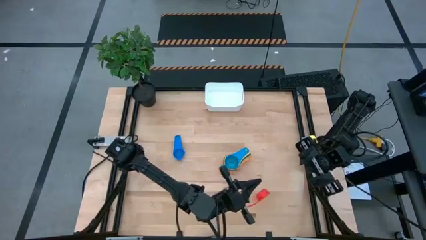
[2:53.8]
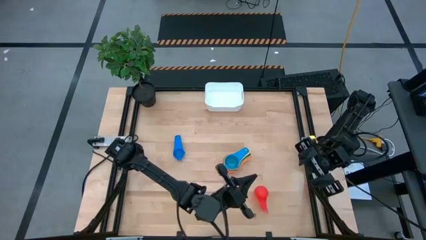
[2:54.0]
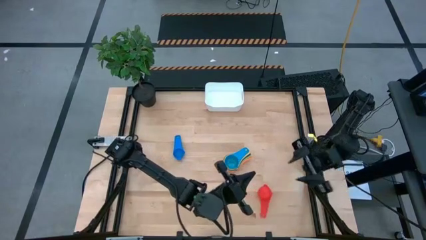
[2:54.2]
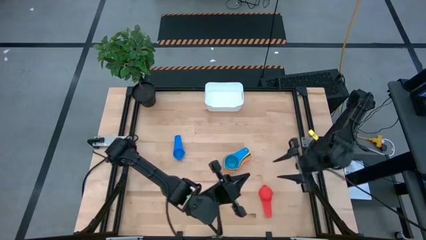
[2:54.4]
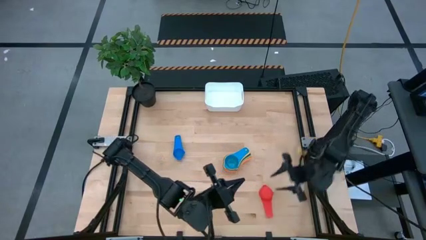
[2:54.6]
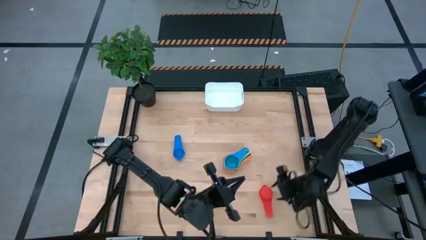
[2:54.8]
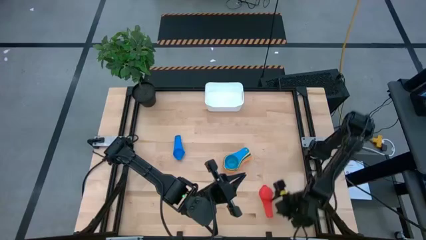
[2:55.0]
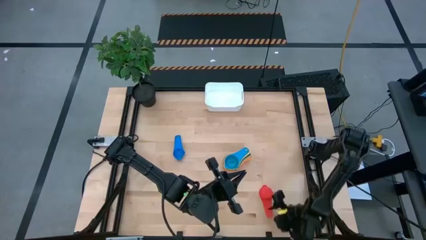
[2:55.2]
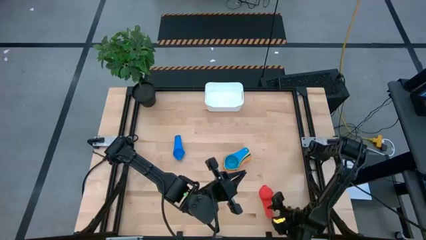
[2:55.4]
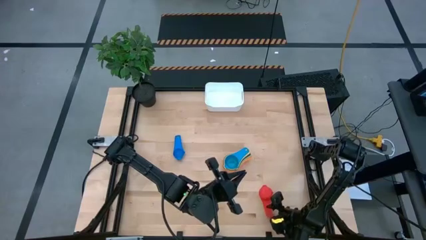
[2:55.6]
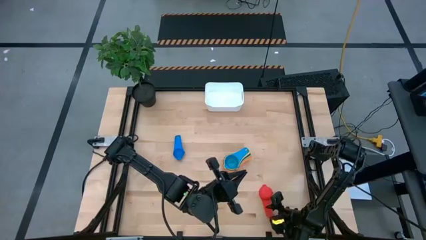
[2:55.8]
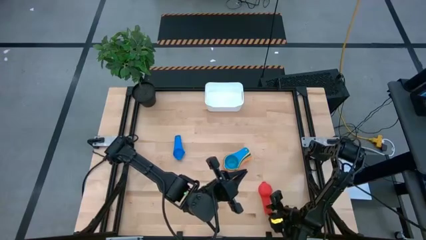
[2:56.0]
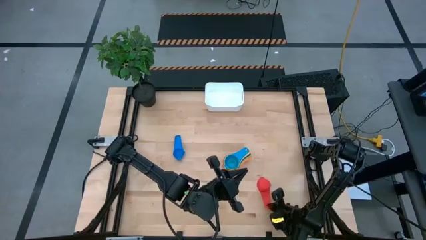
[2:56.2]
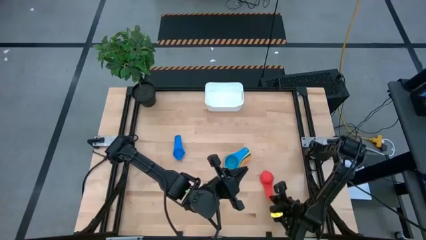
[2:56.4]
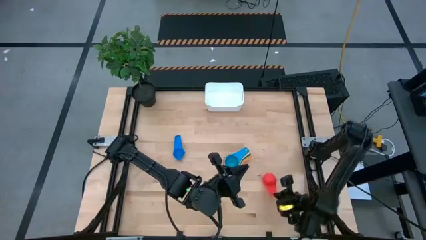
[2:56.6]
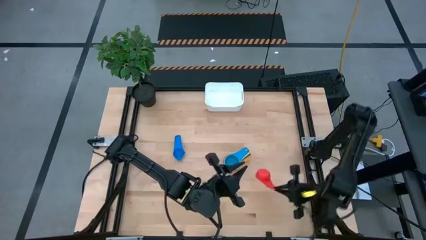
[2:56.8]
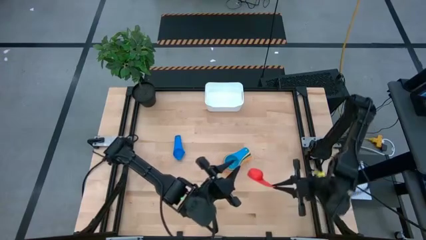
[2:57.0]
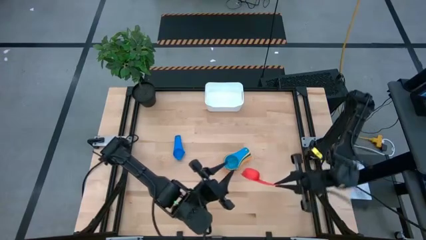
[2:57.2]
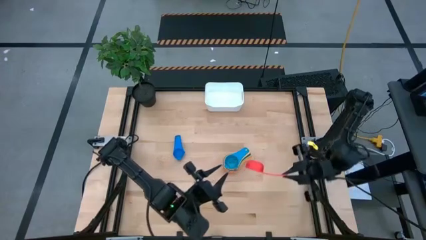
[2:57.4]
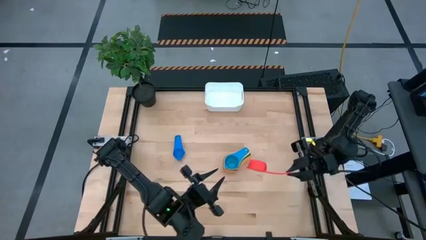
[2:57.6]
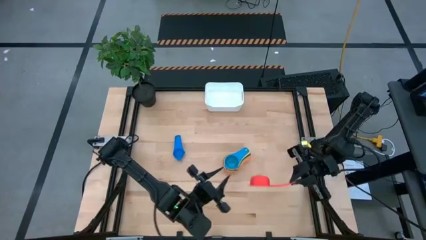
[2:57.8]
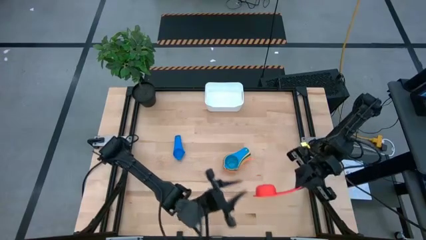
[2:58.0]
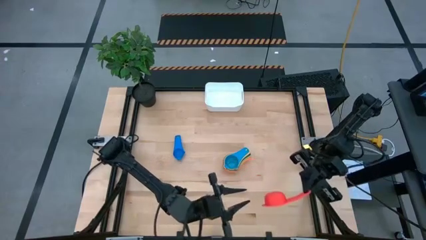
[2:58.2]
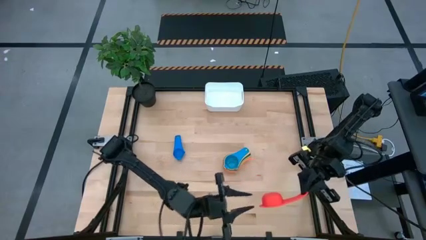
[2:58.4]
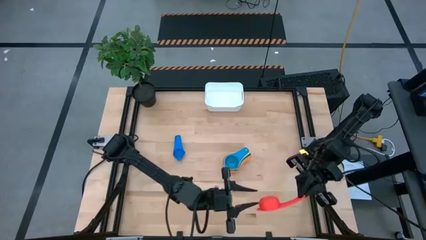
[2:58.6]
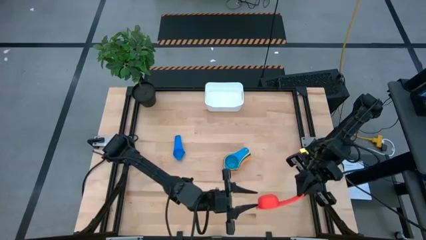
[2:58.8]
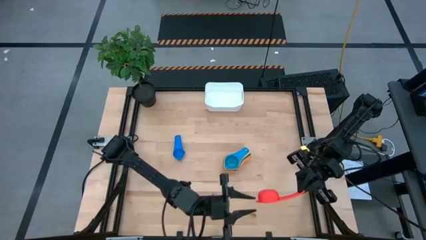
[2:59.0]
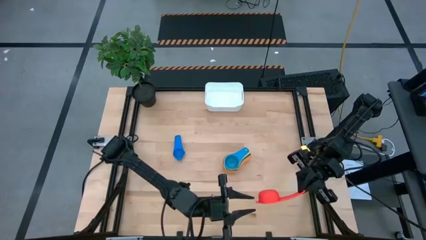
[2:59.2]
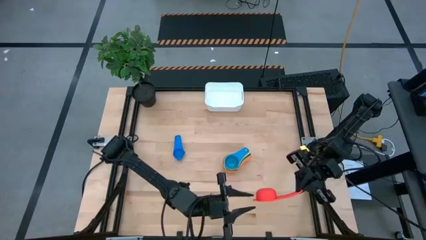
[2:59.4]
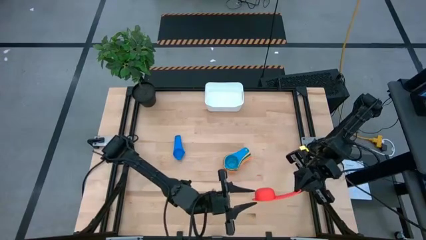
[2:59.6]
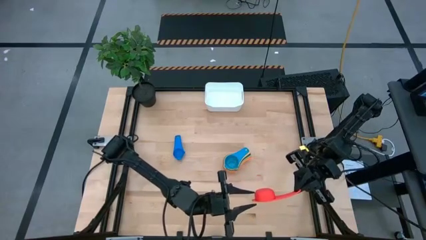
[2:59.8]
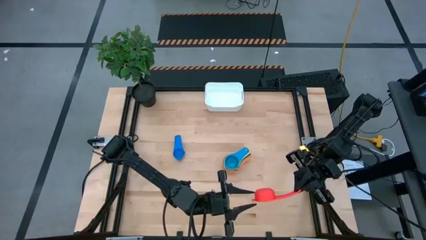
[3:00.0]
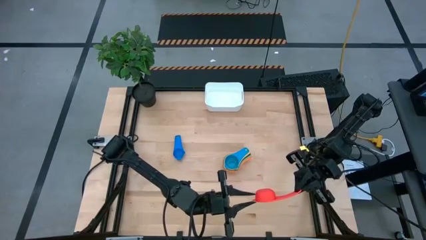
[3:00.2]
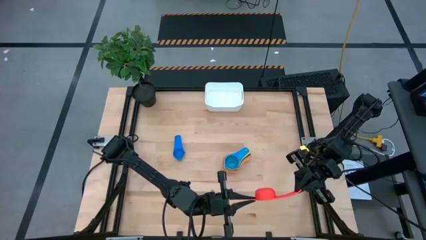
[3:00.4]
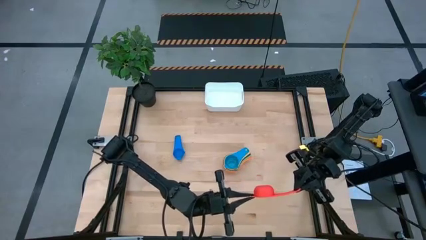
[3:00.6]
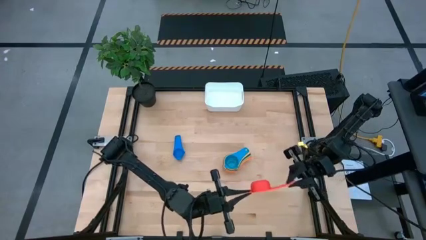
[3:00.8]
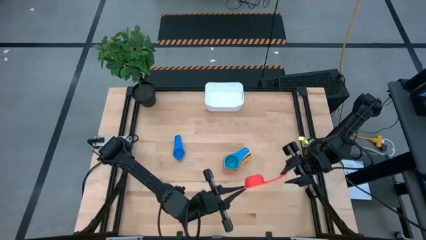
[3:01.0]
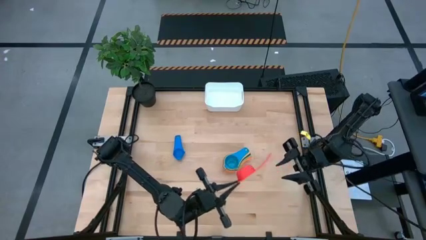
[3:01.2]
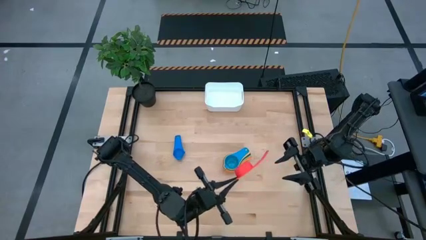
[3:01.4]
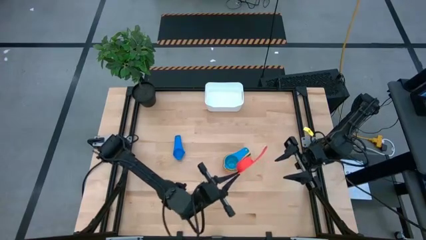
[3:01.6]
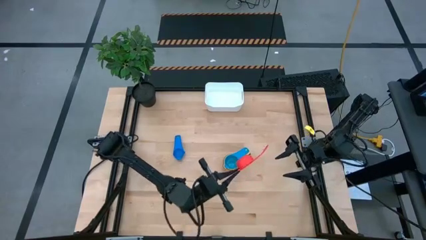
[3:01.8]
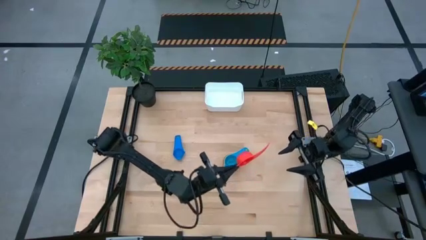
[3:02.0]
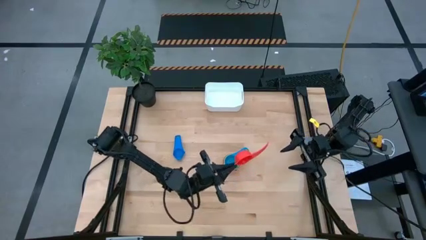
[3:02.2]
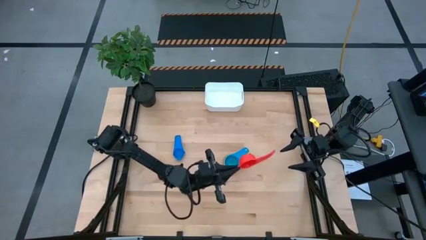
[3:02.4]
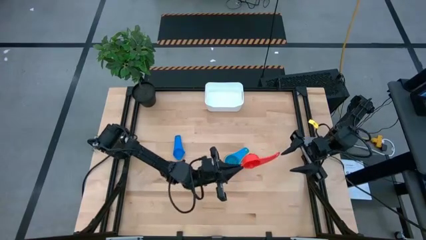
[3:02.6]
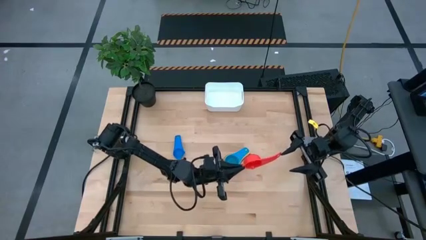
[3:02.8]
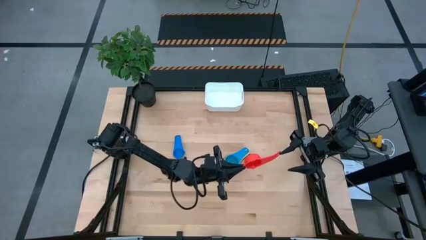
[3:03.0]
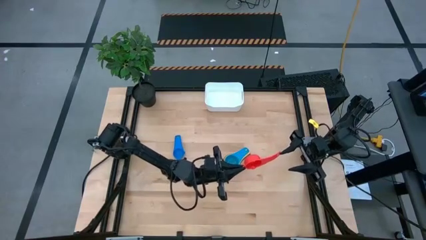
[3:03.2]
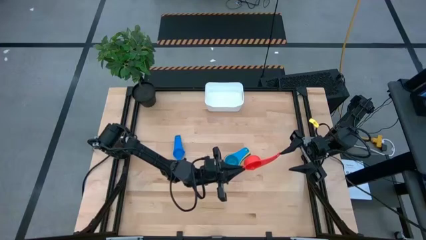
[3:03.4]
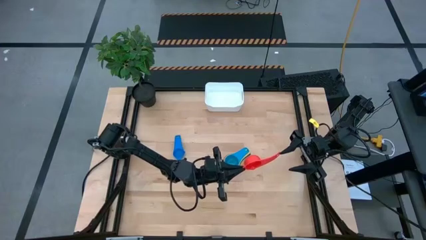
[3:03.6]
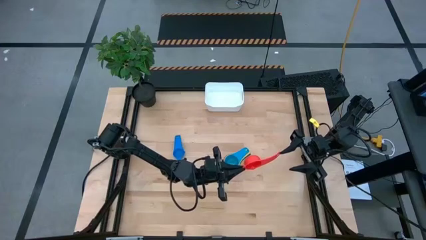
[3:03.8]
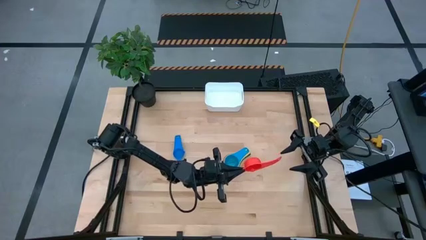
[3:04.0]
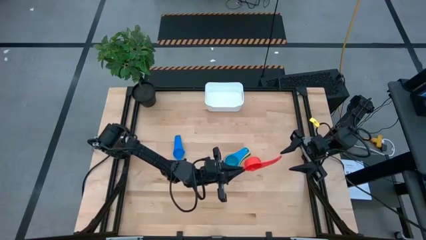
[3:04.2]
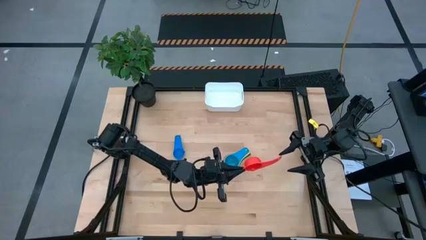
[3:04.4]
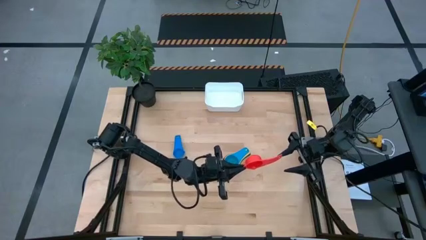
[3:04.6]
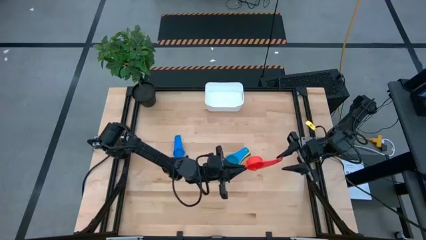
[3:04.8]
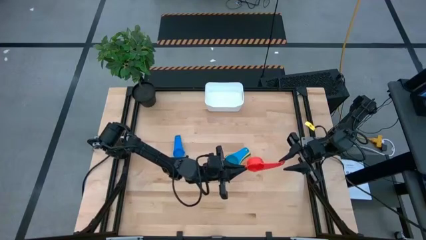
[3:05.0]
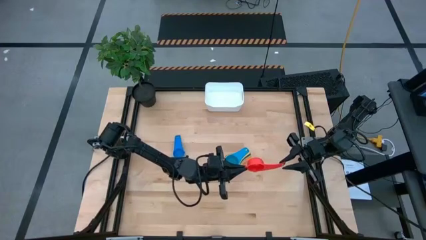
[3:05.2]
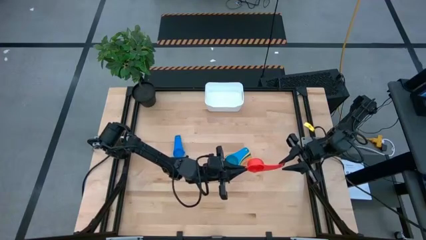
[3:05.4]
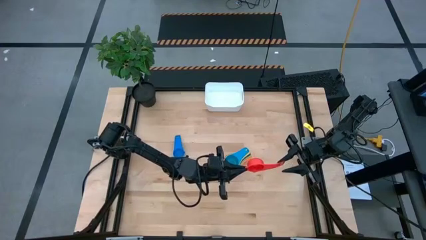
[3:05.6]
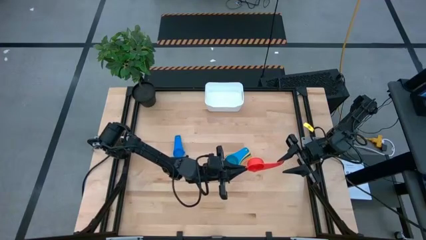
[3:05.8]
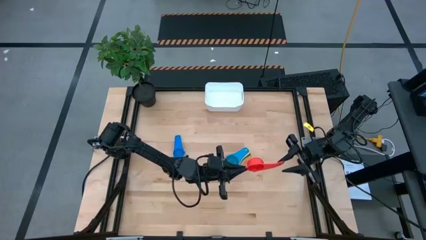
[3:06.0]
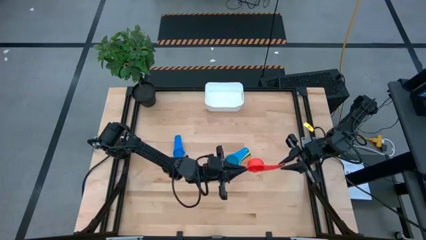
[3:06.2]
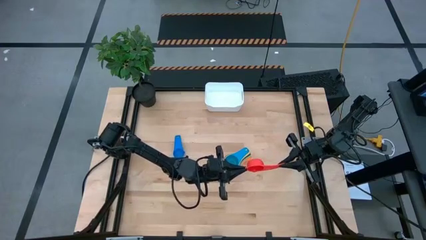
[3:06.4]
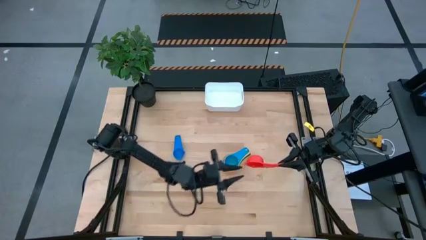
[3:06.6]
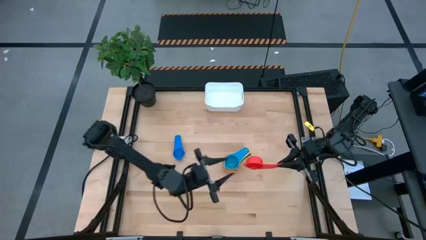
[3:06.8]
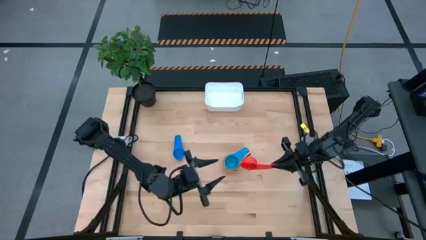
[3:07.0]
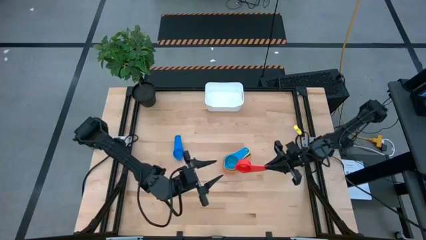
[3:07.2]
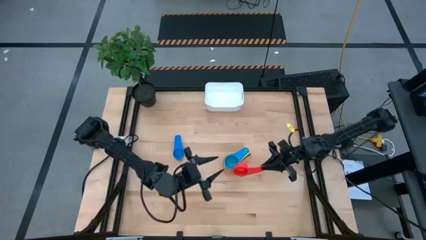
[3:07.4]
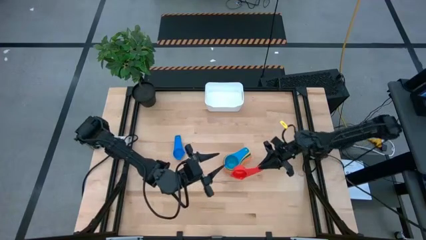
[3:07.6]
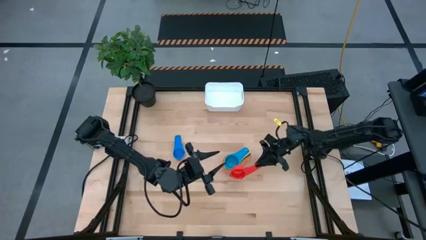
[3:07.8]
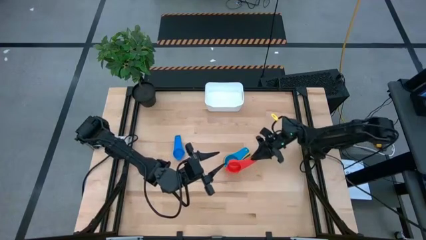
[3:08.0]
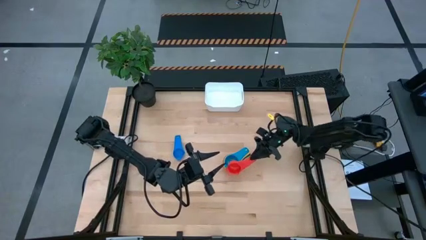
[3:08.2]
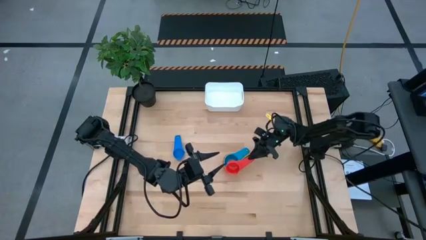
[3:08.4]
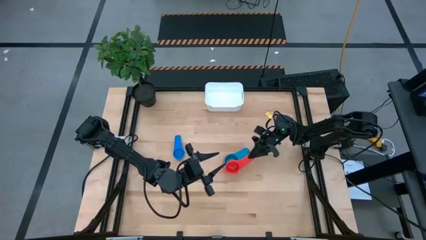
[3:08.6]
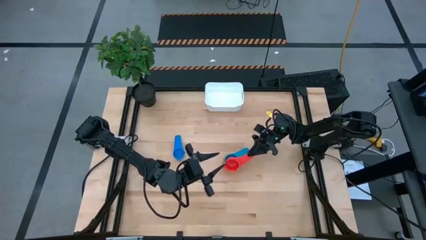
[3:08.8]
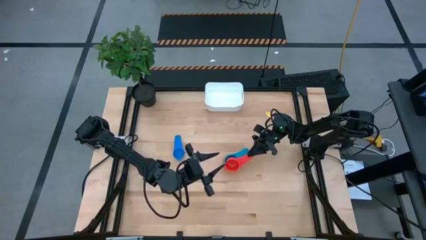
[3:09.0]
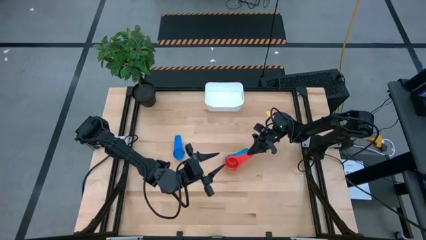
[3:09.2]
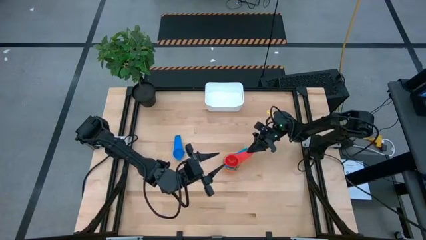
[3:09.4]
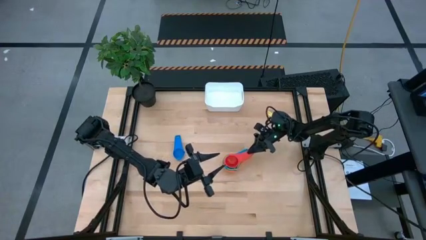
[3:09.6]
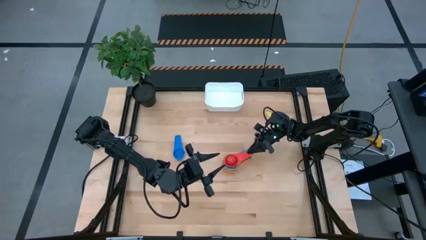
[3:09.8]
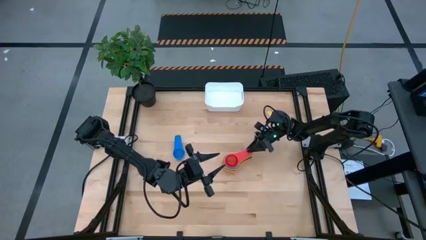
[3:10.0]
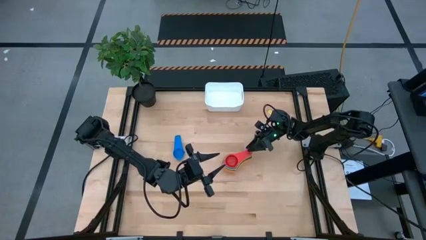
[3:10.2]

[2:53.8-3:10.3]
Task: Nest measuring cups in basket
Stack the red measuring cup on top of the light blue measuring cup
